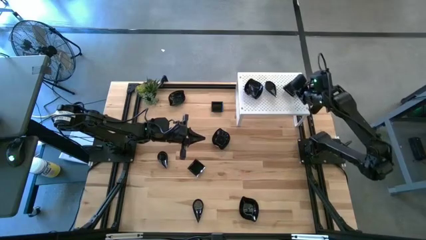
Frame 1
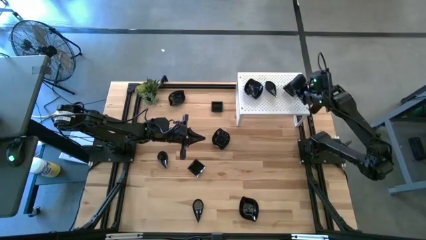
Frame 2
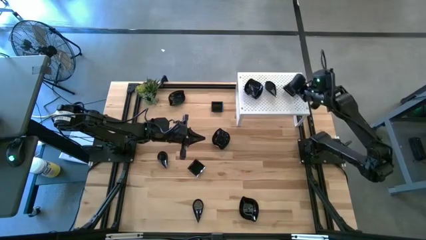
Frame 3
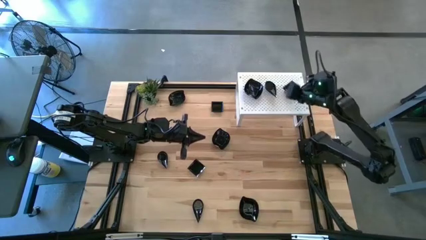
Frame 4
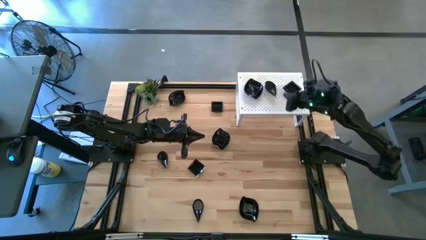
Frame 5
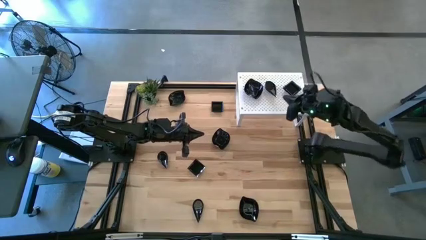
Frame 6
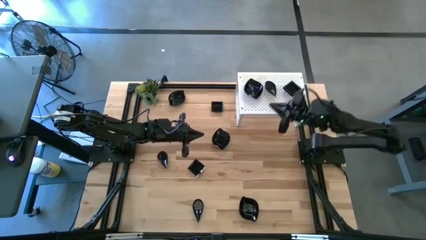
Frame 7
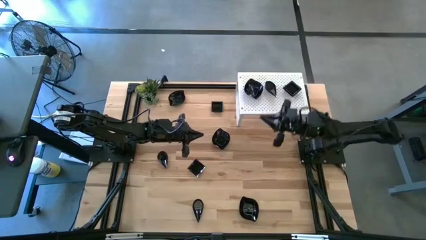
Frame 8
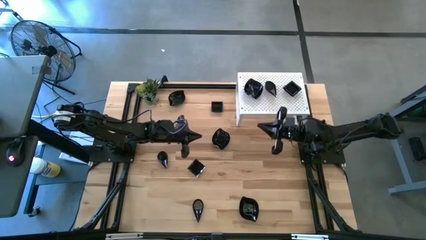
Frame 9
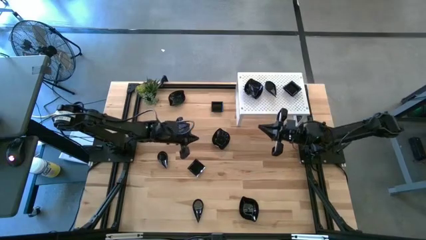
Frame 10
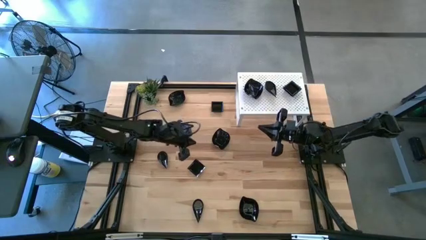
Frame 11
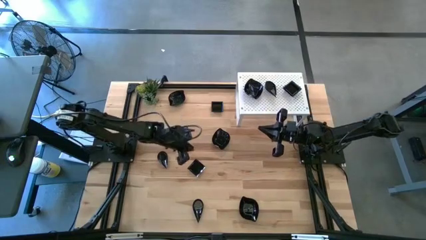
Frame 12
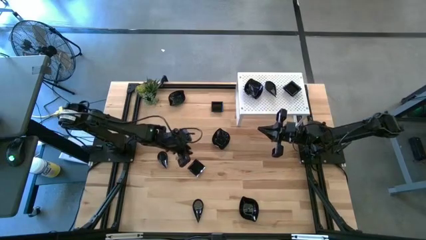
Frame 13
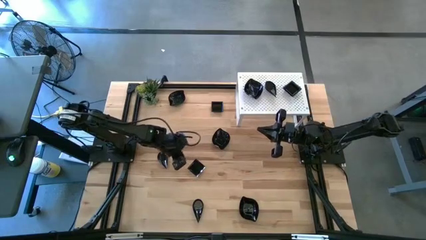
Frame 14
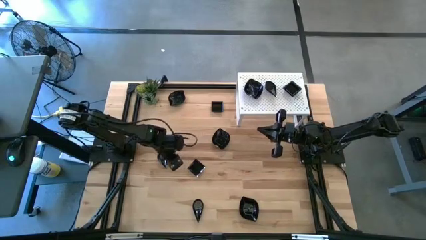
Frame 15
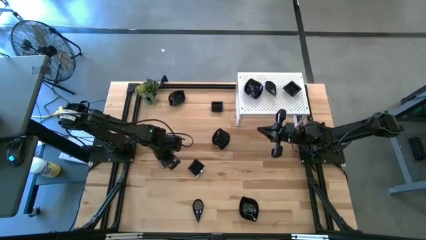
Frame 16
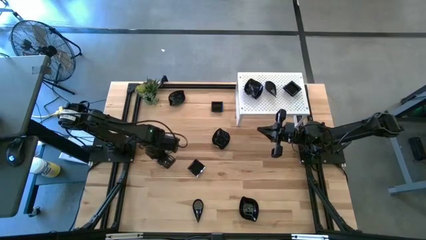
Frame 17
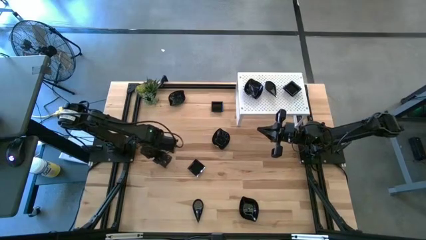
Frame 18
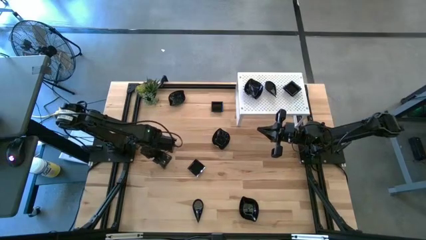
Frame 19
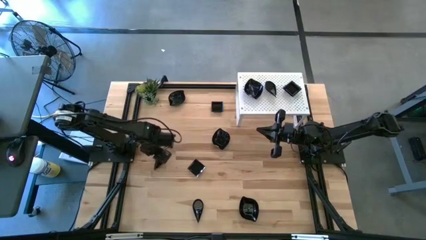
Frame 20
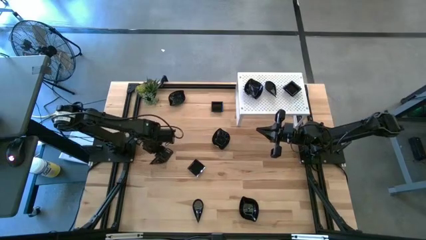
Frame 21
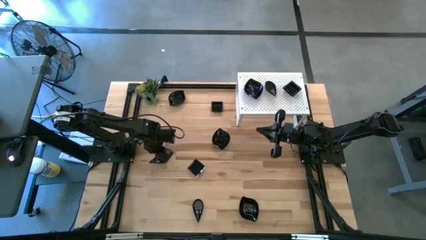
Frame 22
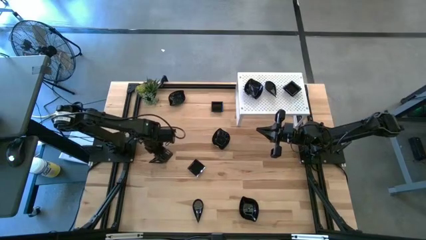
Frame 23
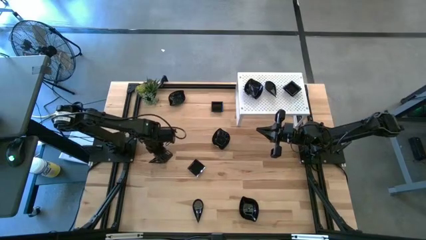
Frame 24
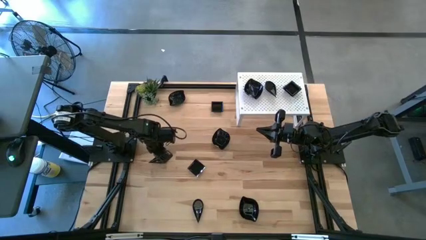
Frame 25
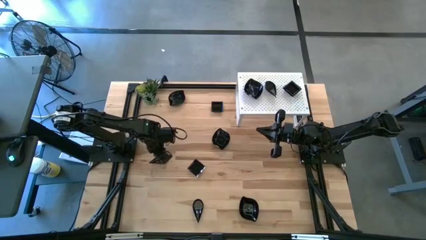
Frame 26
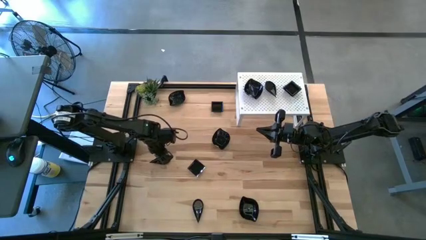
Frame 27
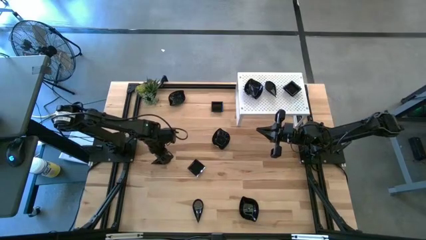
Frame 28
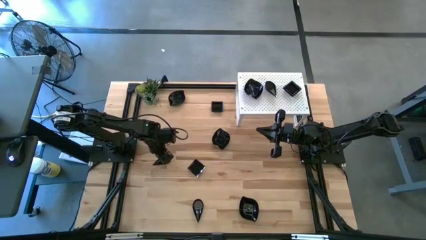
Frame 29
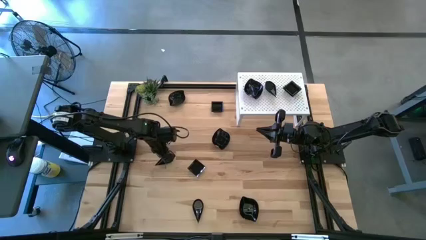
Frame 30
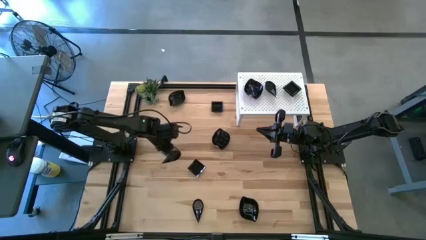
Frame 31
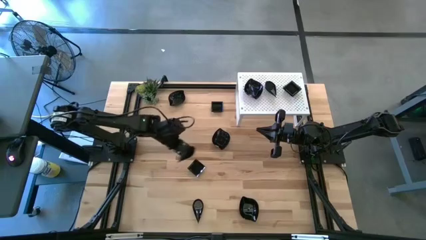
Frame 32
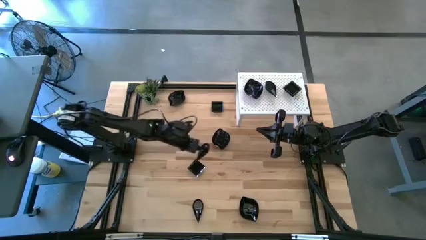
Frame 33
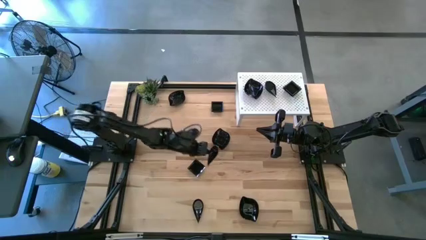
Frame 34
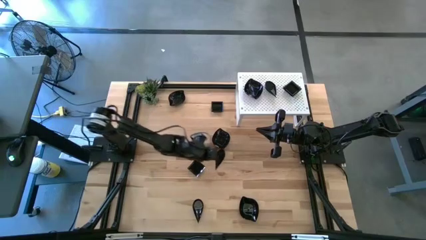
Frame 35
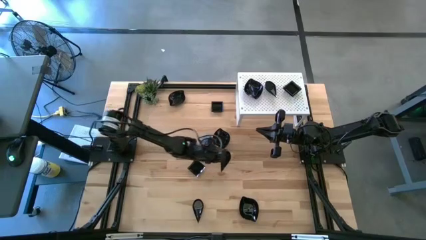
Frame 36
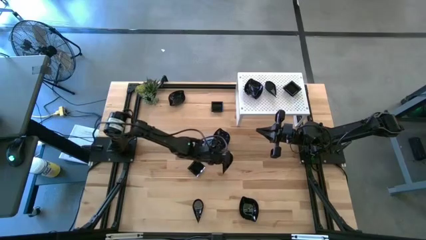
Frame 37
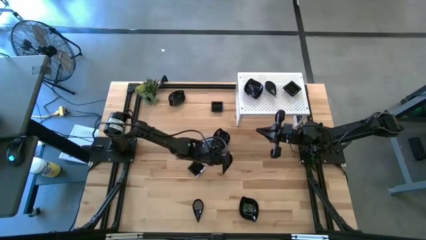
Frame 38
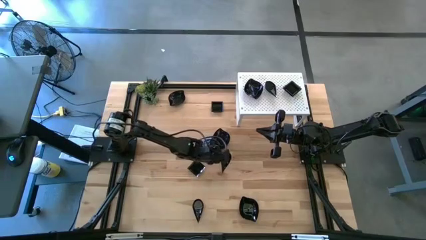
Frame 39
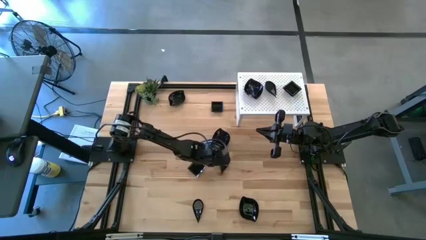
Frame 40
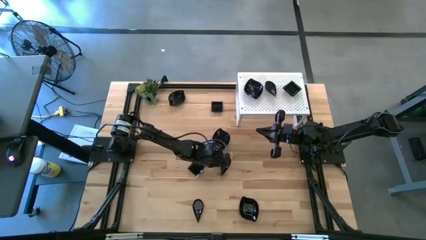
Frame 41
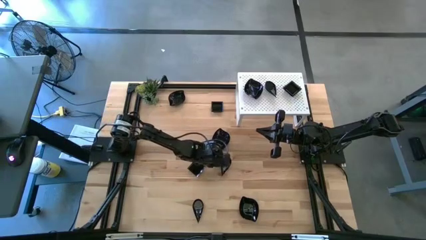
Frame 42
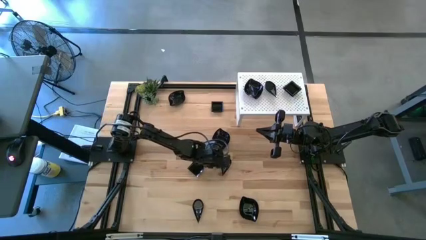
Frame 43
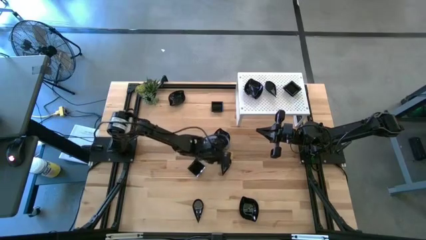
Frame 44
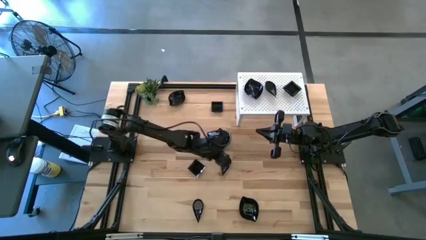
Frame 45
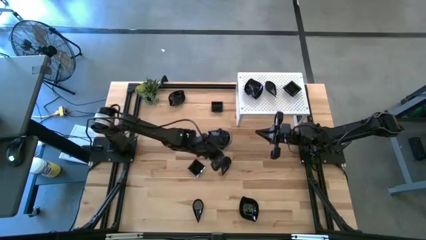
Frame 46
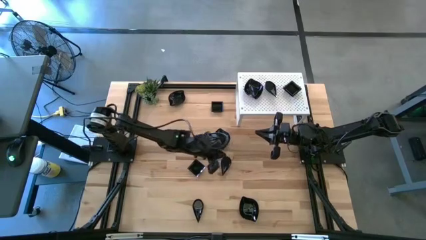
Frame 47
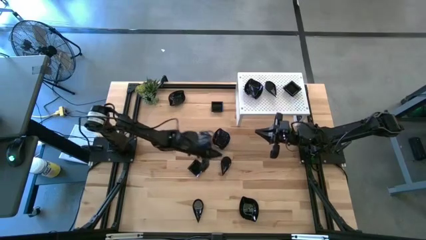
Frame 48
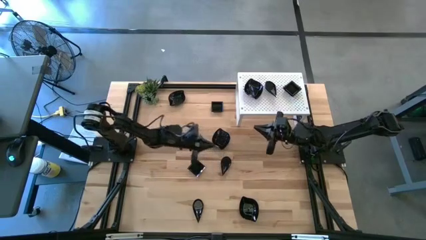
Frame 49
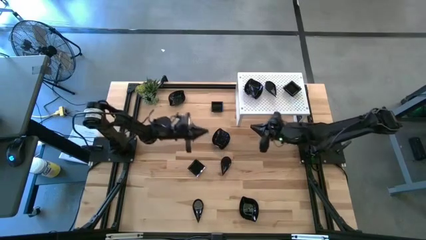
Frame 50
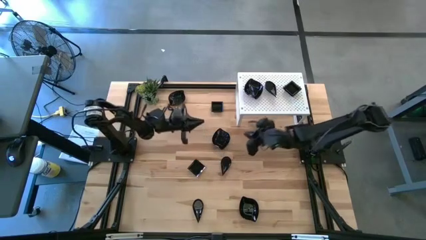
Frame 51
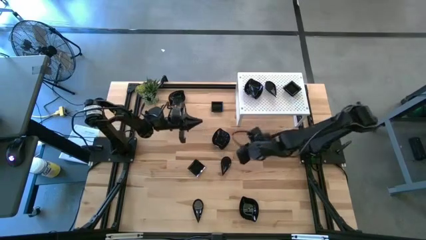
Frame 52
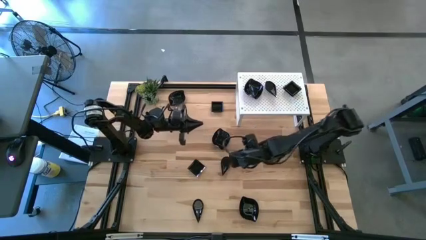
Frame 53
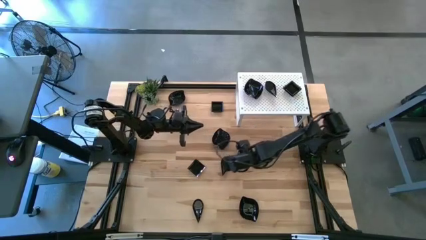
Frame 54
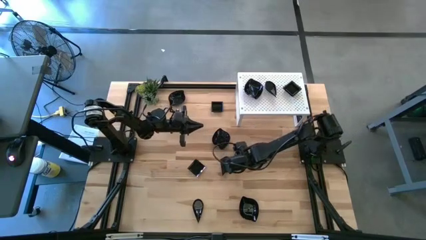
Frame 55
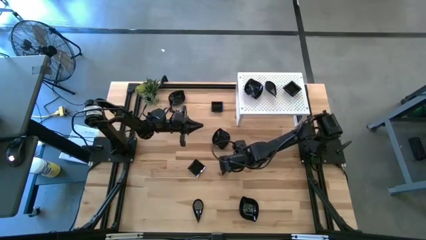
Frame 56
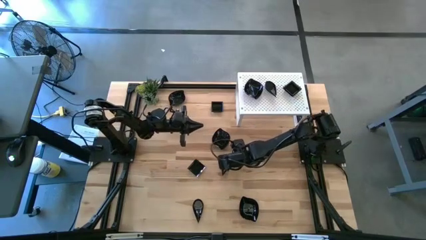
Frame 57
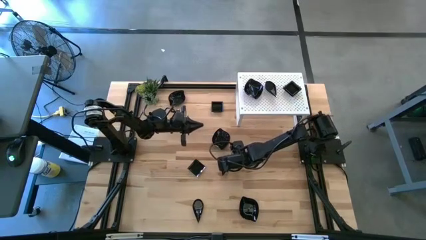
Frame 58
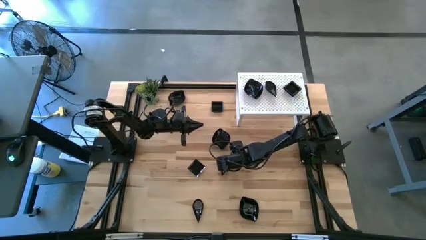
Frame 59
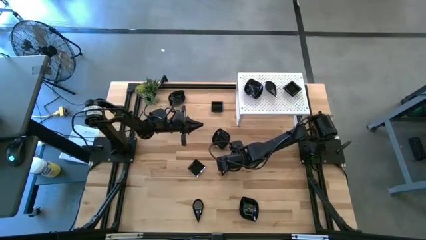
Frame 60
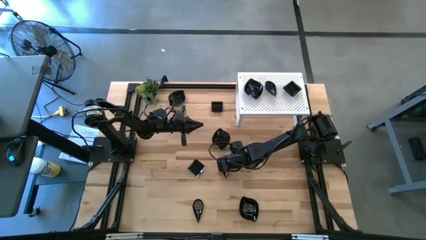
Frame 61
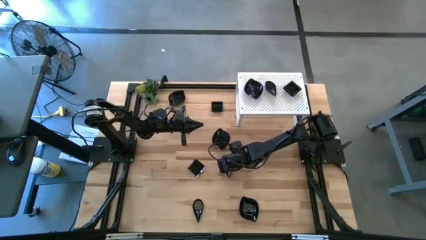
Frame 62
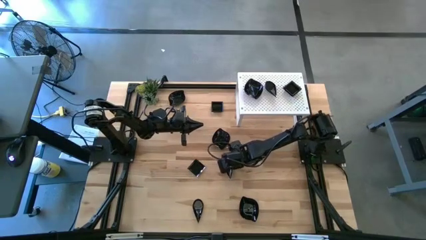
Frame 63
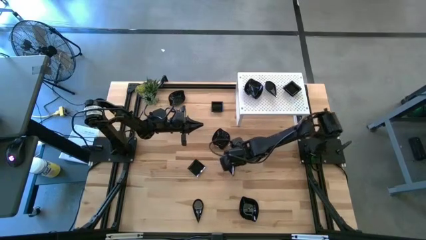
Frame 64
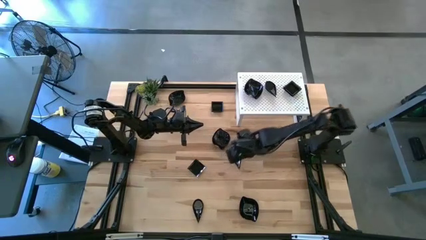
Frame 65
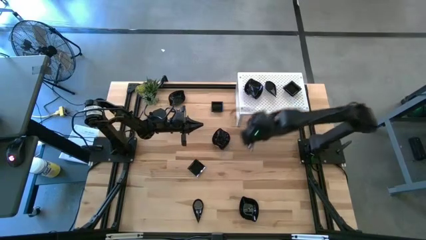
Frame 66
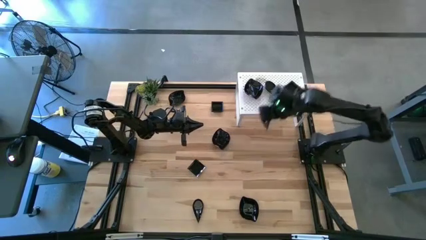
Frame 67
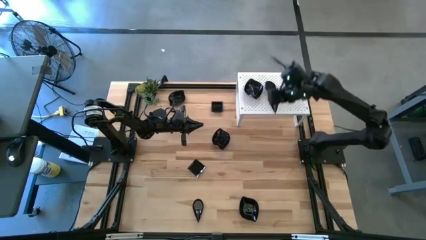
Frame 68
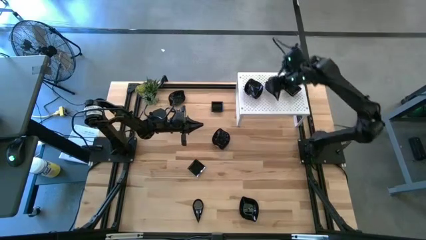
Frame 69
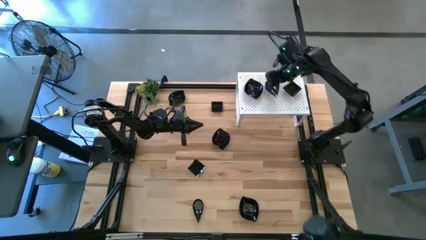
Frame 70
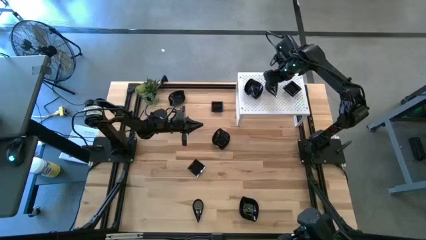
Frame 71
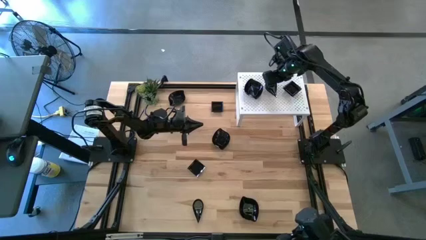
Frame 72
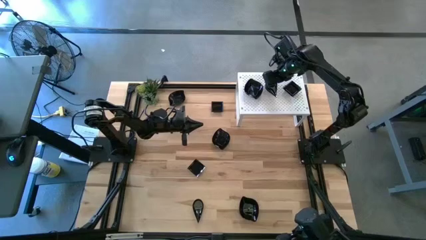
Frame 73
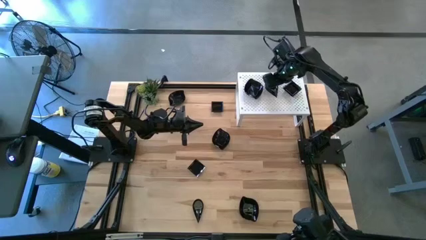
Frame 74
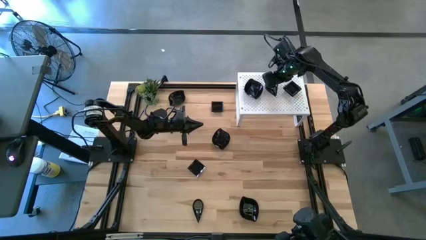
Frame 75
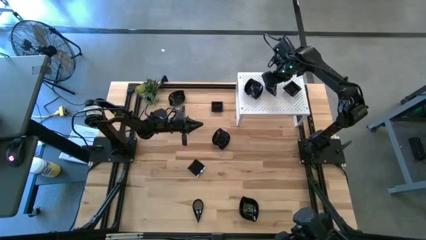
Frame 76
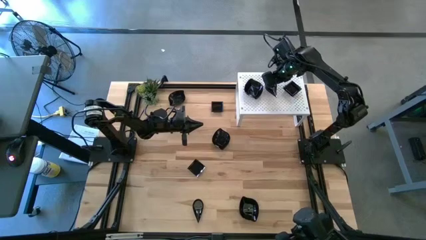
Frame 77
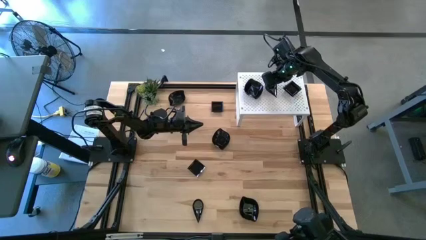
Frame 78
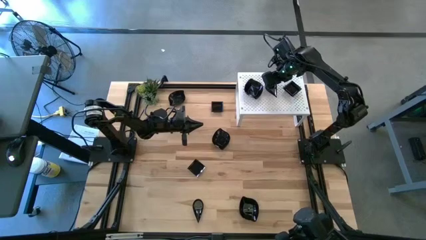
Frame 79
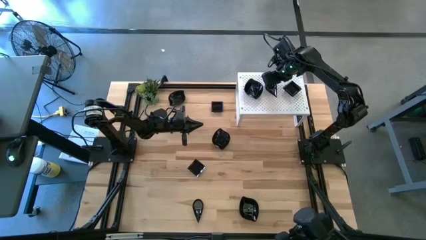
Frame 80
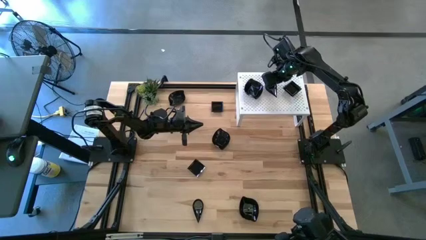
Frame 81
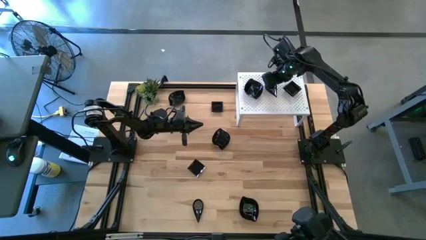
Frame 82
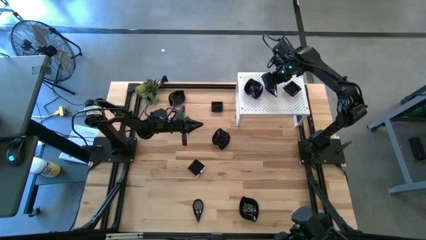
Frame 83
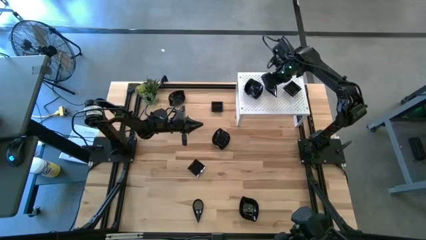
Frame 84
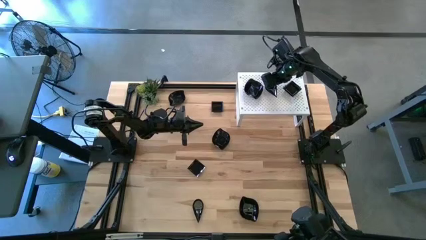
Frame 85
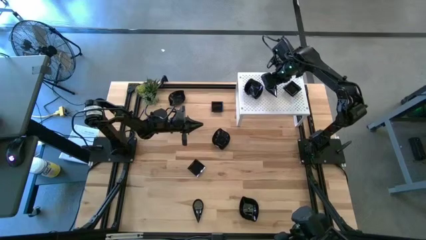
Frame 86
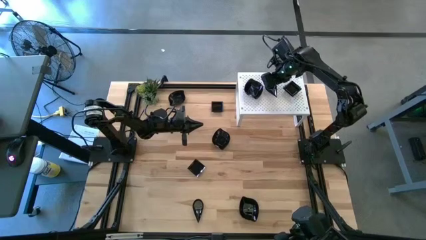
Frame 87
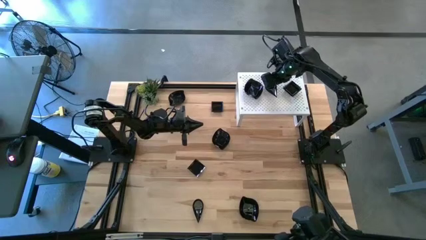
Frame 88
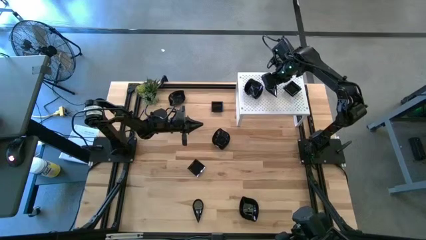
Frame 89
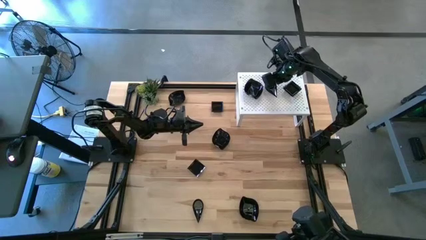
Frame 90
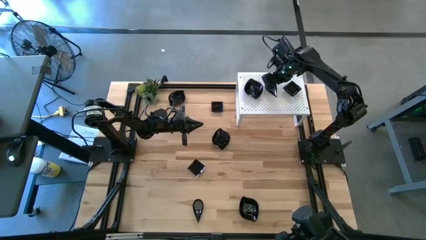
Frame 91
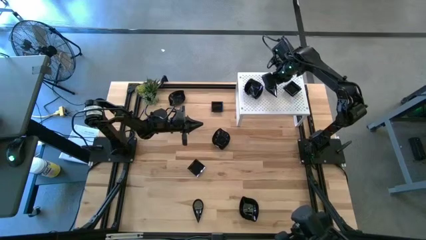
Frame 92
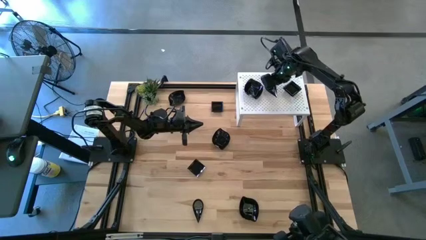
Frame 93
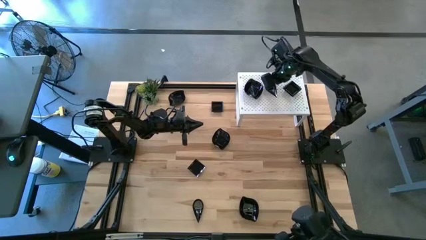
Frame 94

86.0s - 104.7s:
Task: Pick & Place Mini shaped plates
Stack the black drop-shaped plate on top of the black drop-shaped plates on the shelf
